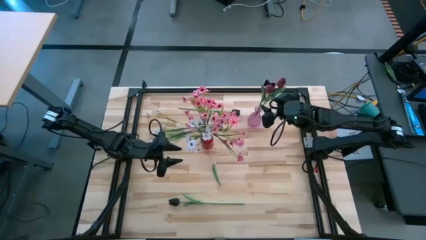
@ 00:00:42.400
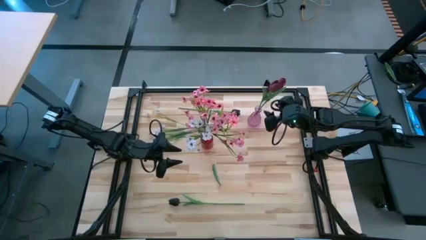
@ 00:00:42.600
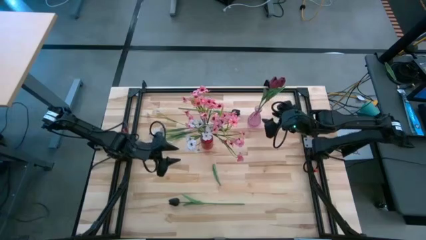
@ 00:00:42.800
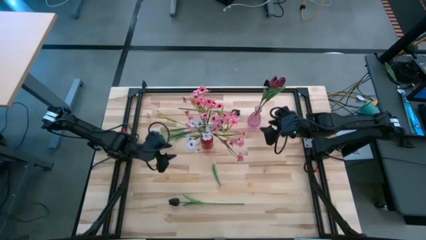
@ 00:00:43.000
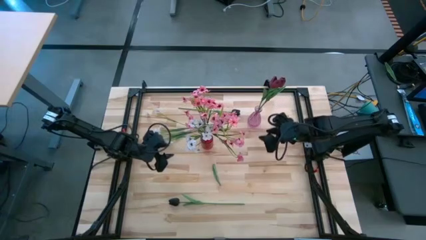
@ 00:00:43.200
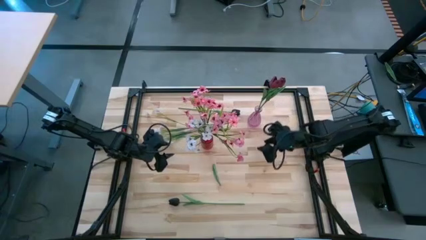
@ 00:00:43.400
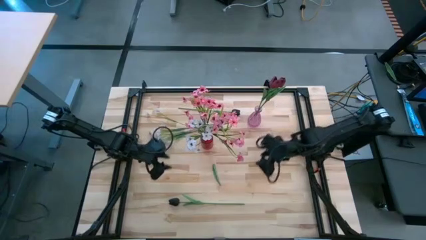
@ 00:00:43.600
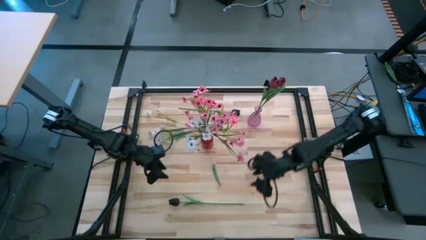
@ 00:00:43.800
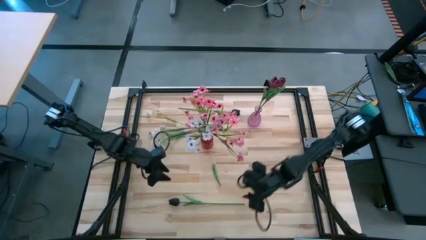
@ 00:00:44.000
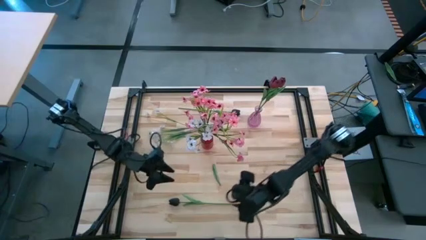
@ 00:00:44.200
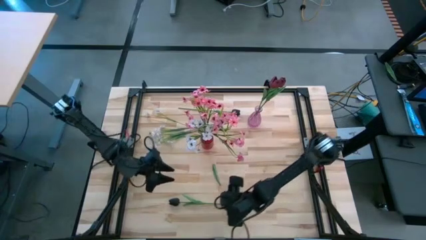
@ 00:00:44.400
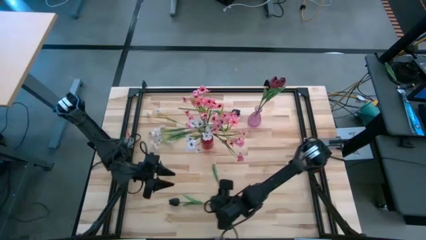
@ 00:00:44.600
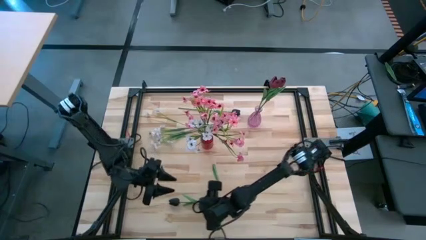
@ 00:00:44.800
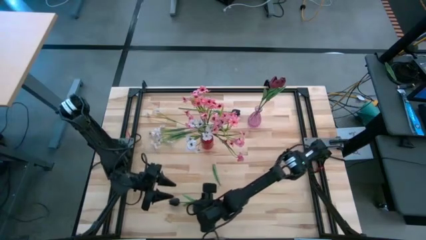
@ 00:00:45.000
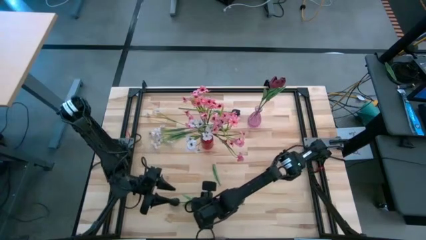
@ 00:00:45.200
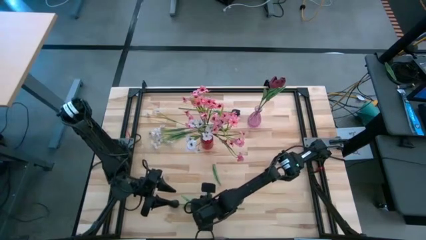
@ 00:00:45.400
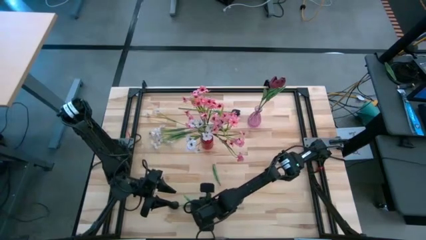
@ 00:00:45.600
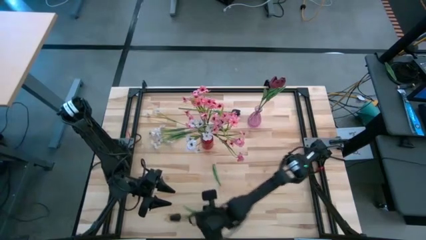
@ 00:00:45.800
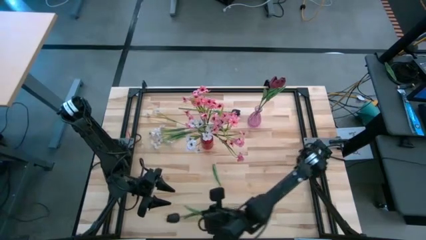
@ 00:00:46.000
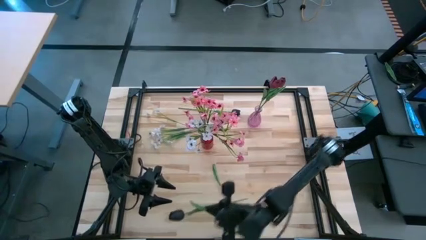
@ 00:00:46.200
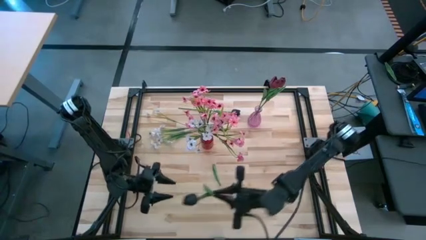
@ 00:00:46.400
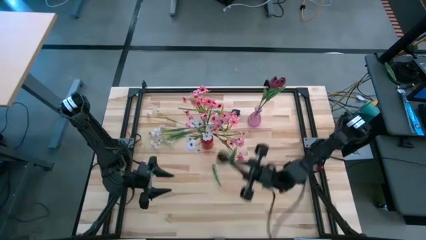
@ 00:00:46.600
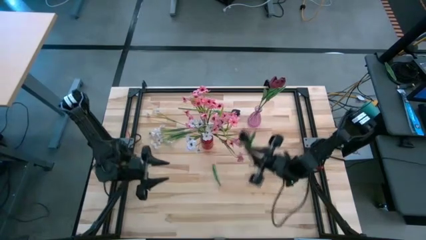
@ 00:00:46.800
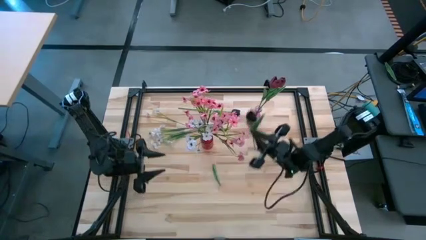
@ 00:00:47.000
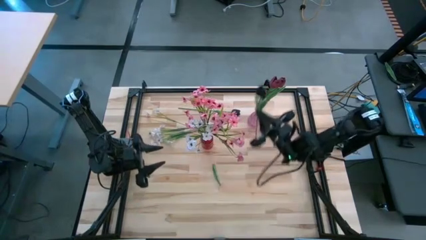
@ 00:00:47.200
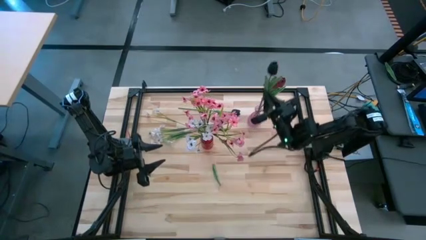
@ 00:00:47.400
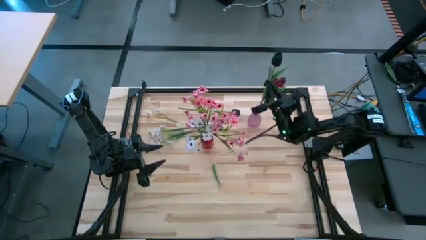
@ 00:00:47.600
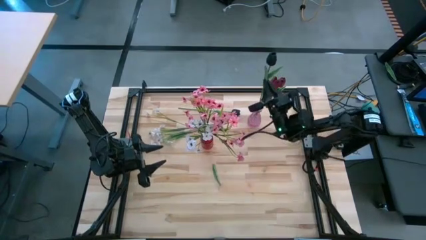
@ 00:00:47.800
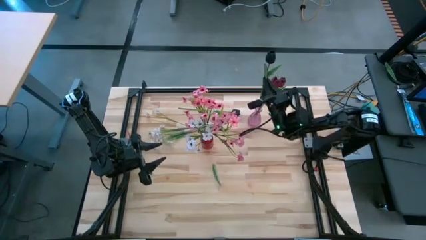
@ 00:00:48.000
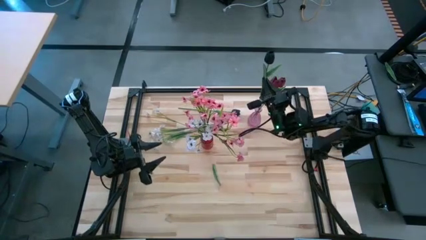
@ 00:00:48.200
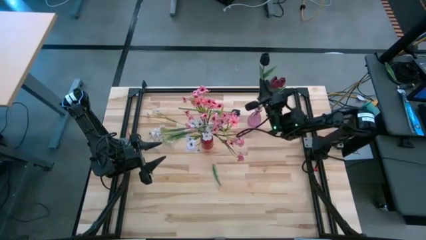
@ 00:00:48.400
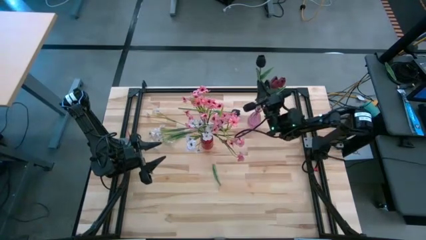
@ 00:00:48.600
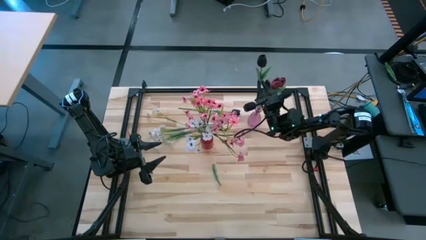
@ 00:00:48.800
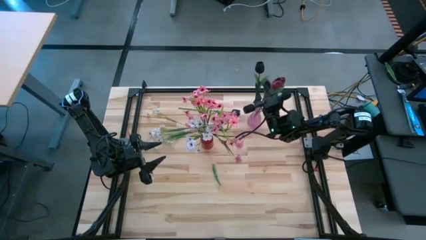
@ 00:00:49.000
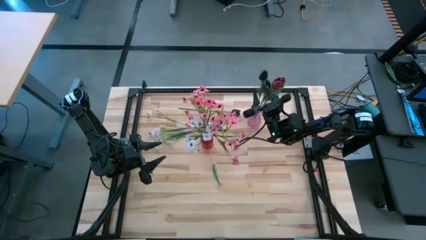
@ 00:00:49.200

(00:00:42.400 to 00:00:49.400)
Task: Sort flowers into vase by color
Put the bottom black tulip into the violet vase

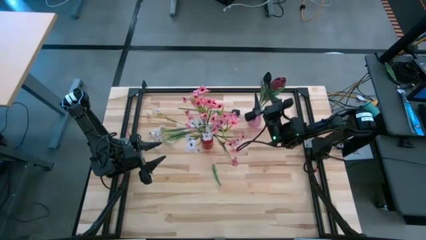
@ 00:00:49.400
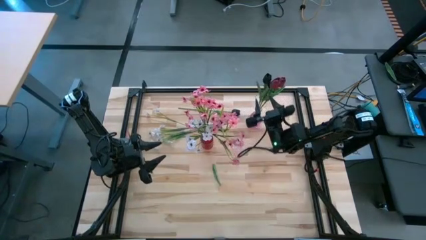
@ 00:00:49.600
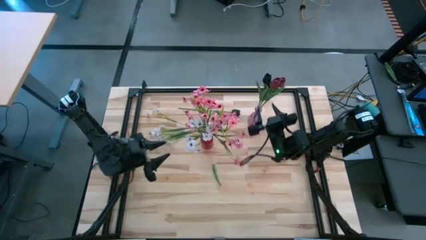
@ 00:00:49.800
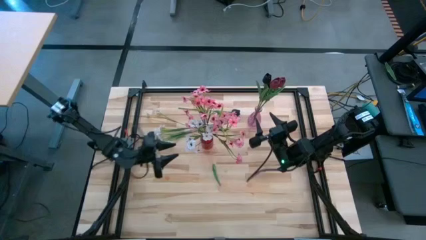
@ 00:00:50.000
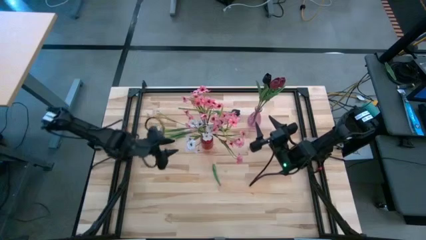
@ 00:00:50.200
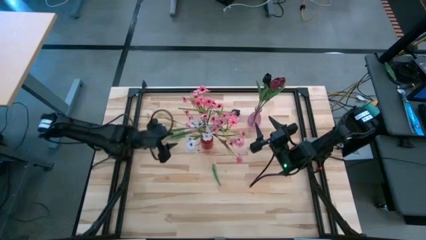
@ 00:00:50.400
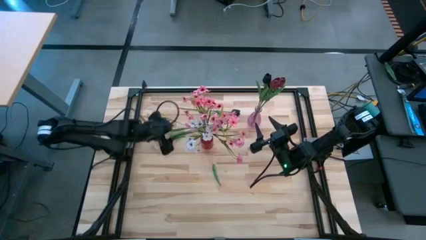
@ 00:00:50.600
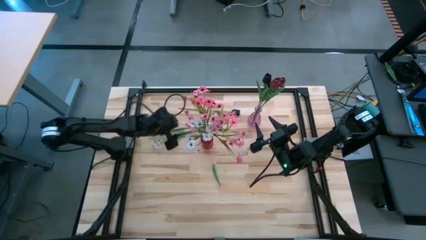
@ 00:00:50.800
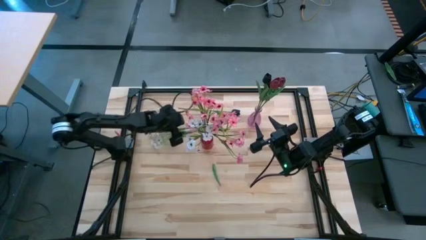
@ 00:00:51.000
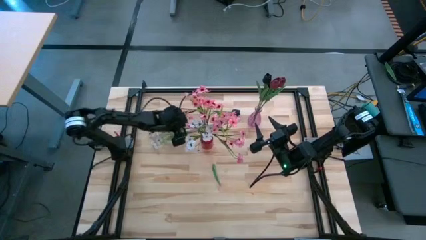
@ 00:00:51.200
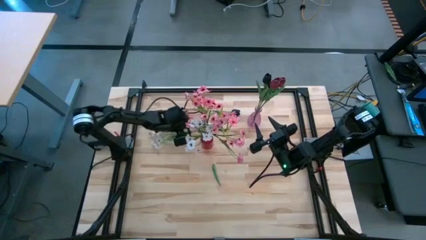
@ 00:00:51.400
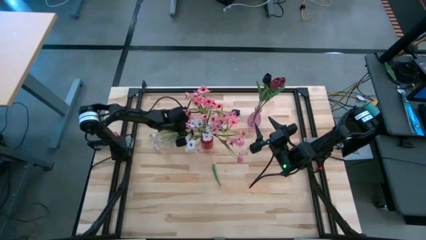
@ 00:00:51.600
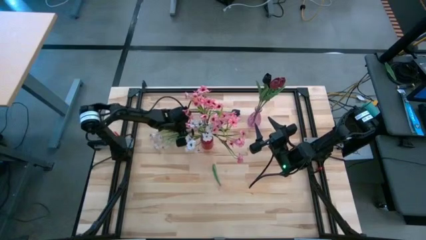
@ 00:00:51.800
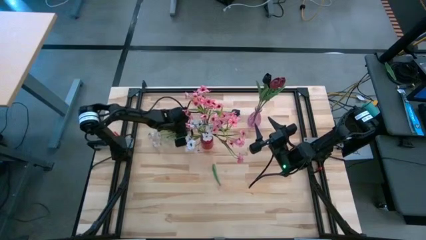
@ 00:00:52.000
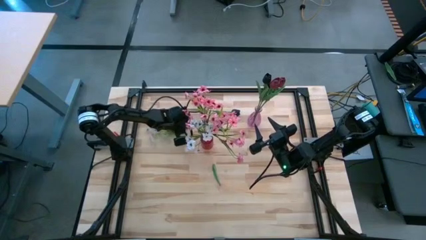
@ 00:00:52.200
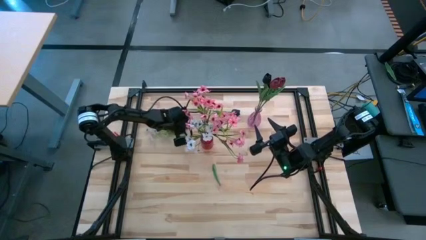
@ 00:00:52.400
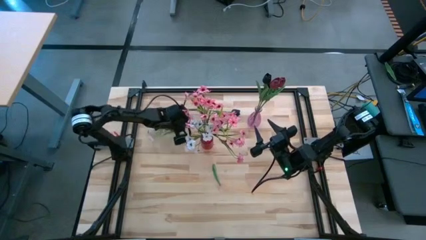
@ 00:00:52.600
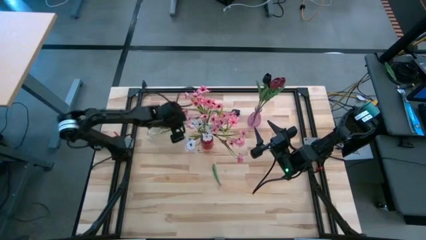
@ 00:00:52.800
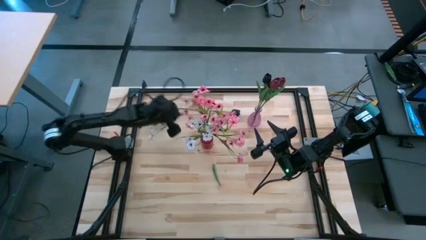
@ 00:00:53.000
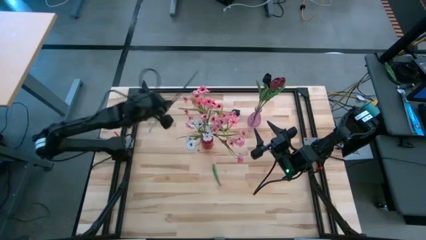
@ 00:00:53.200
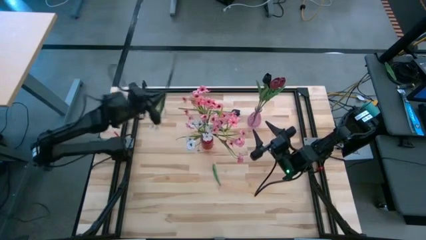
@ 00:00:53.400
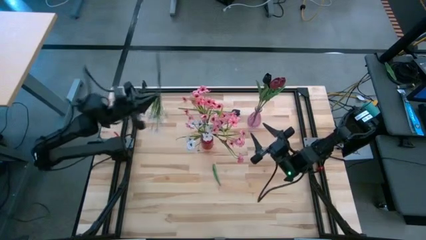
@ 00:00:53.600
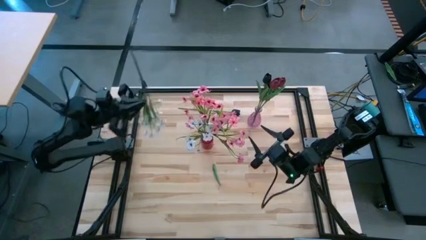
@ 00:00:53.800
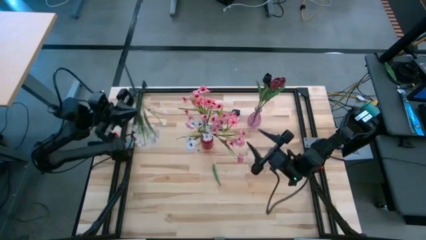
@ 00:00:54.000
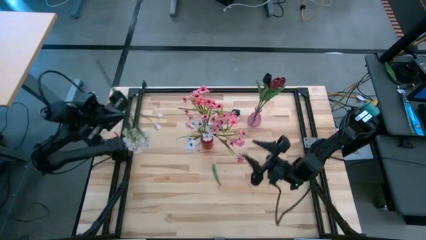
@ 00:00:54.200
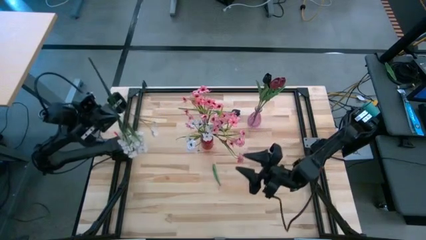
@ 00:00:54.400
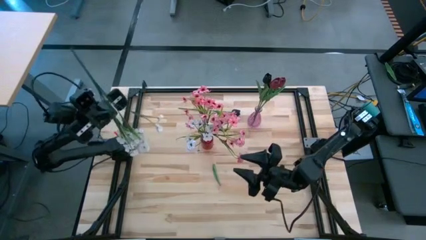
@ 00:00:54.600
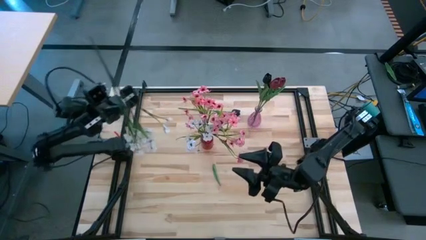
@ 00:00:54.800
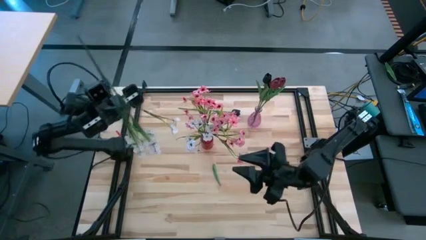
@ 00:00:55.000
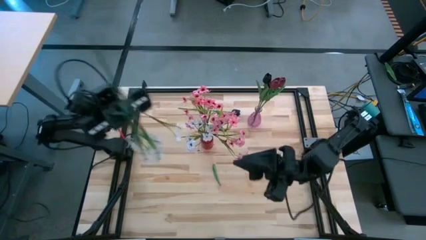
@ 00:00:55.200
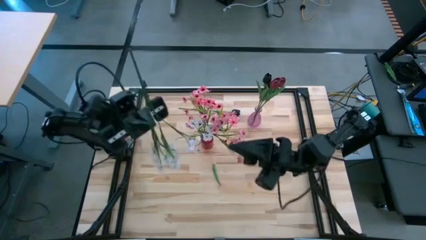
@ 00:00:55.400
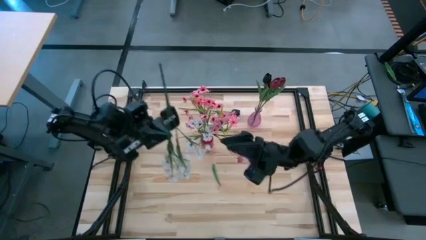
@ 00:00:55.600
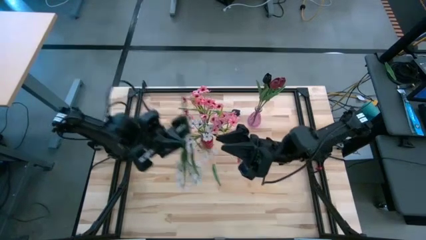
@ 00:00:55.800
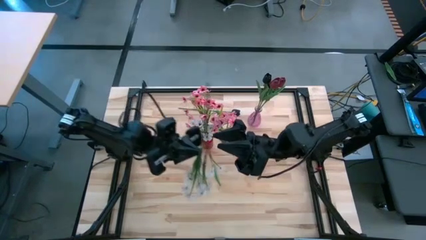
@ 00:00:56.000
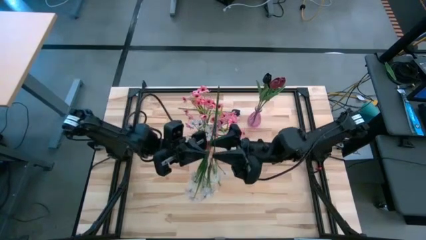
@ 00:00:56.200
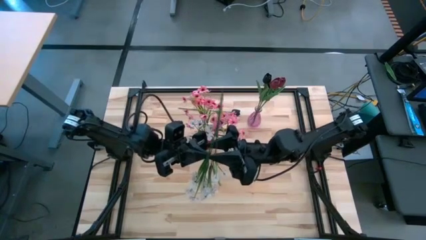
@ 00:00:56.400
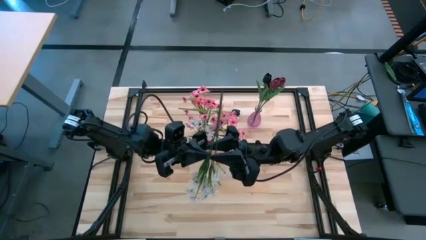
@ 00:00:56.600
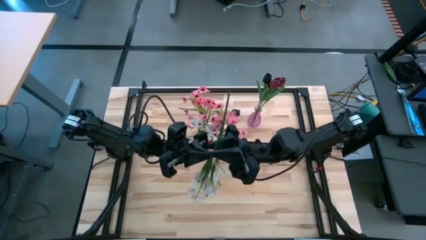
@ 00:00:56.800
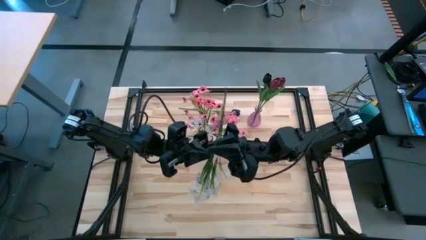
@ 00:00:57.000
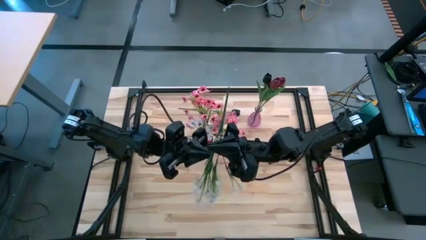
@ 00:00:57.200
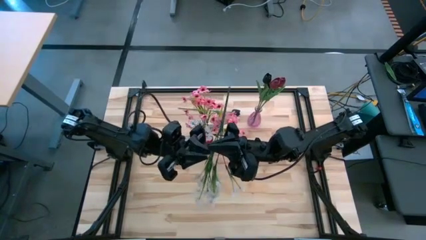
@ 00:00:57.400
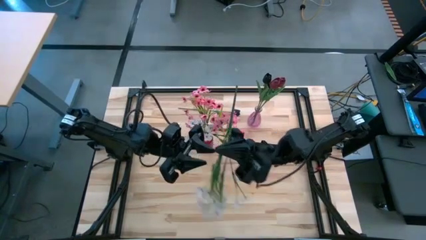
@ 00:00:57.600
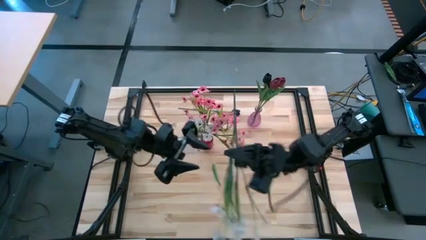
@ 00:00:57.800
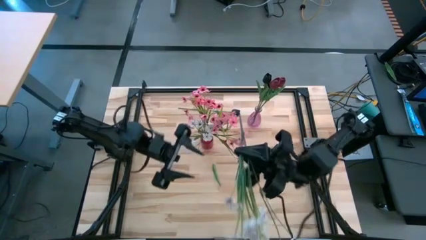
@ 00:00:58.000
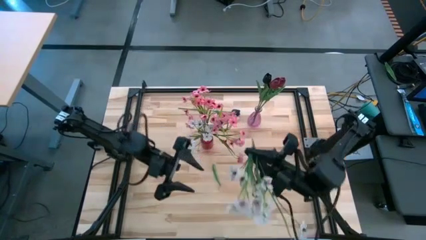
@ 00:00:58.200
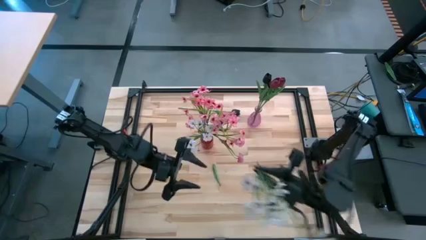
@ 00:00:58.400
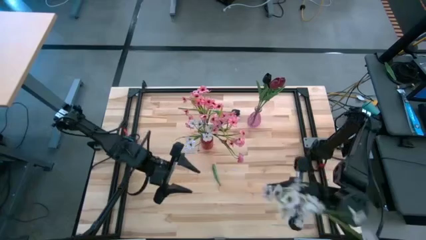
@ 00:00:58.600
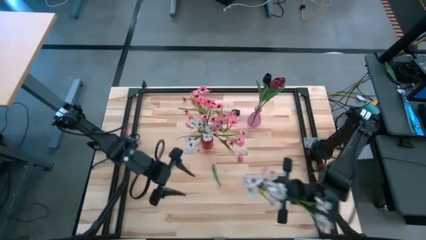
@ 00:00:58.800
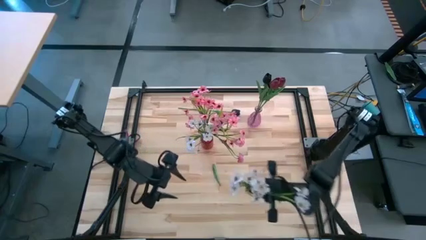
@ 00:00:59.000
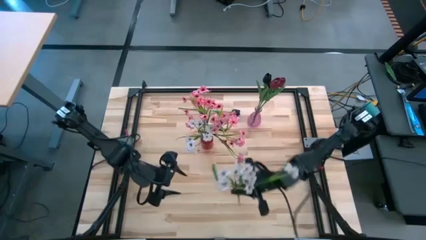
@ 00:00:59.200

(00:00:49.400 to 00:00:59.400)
Put the white flowers into the red vase
